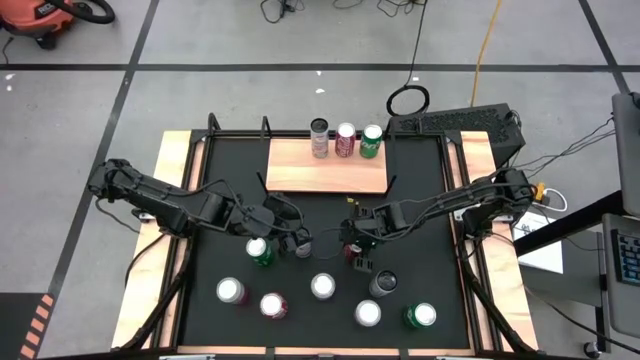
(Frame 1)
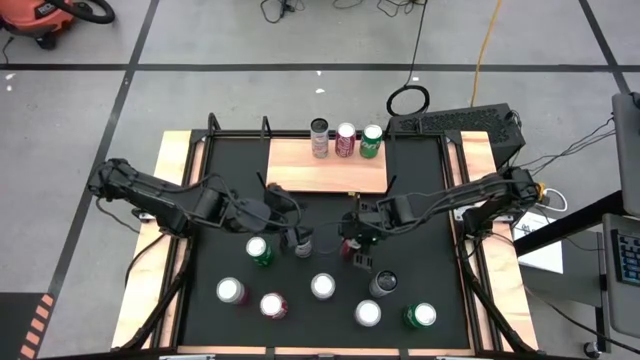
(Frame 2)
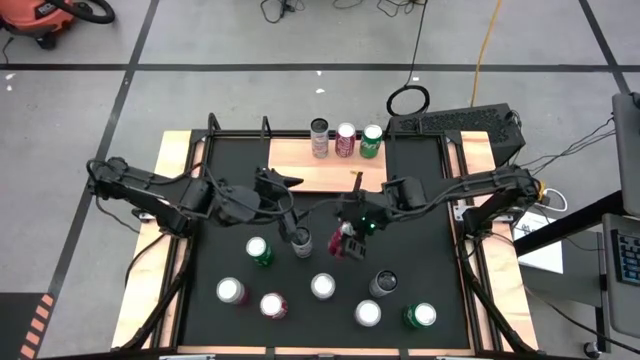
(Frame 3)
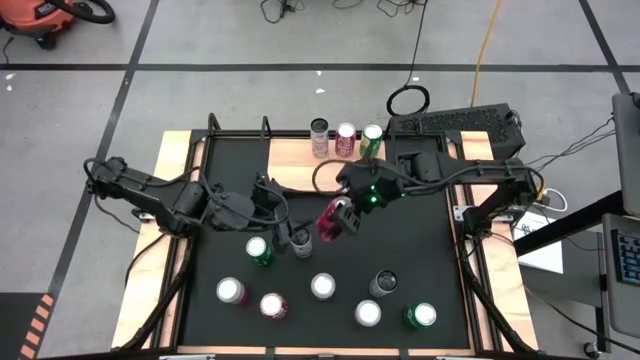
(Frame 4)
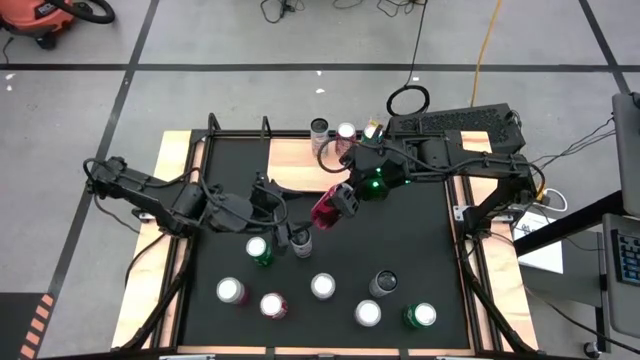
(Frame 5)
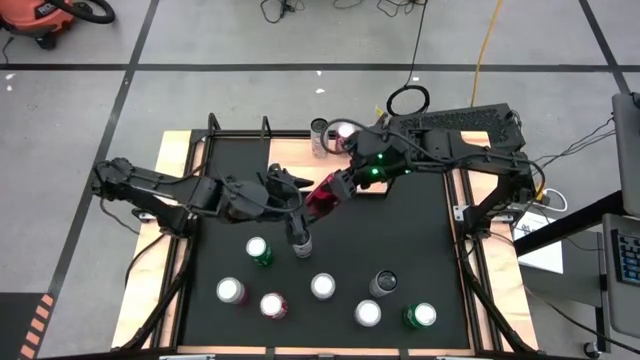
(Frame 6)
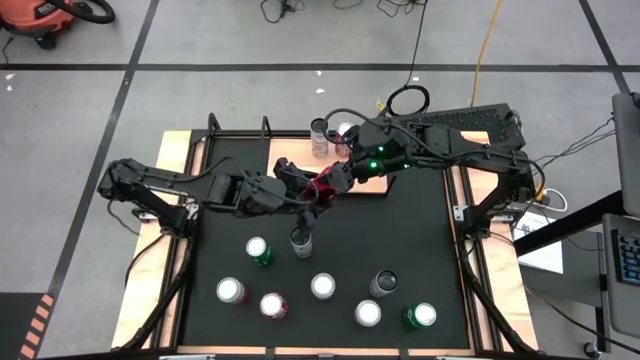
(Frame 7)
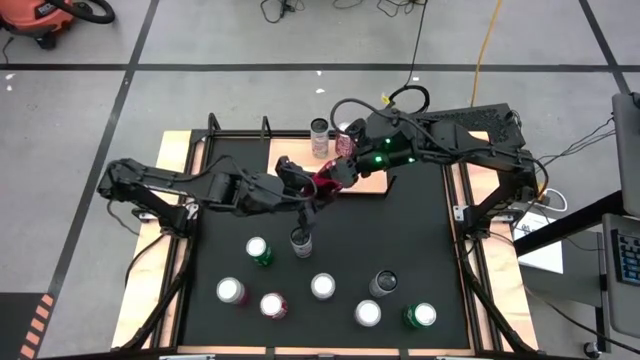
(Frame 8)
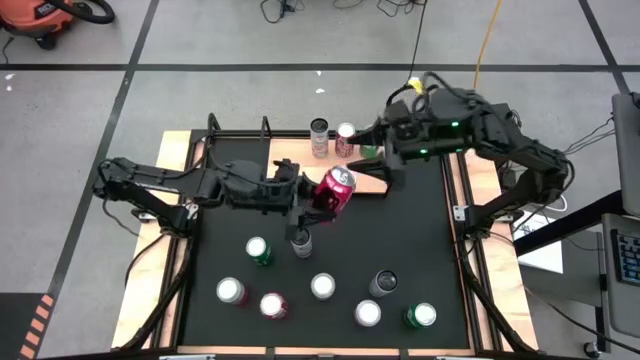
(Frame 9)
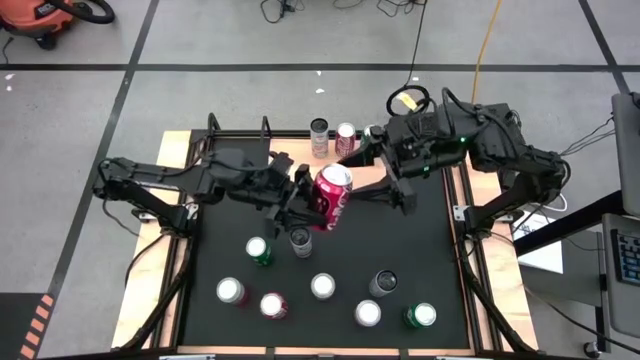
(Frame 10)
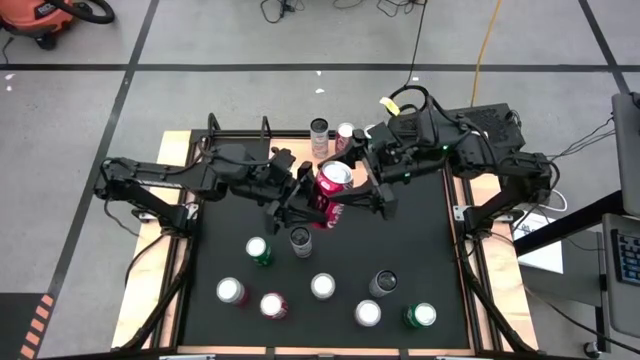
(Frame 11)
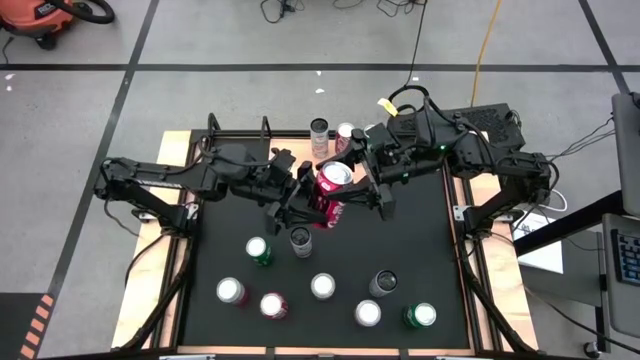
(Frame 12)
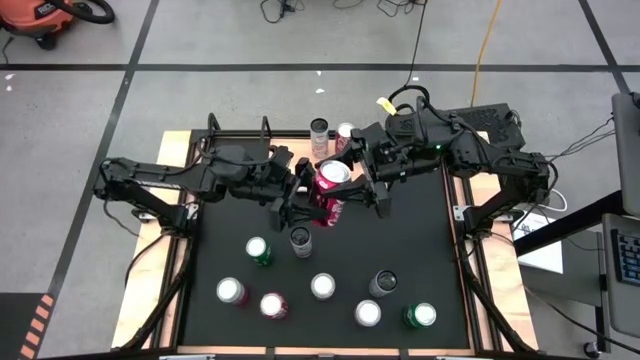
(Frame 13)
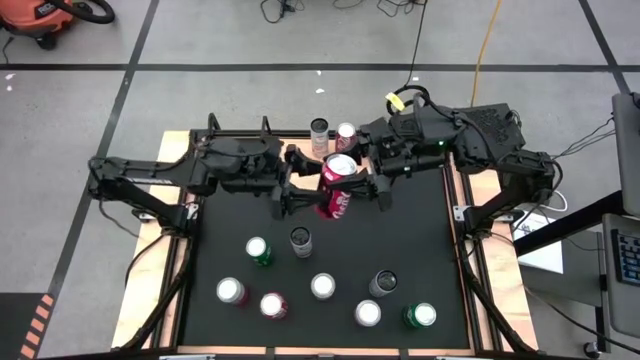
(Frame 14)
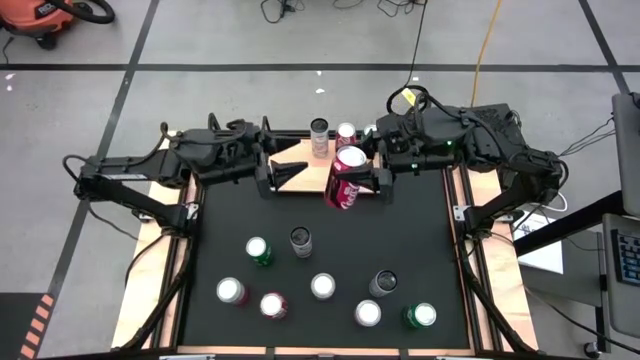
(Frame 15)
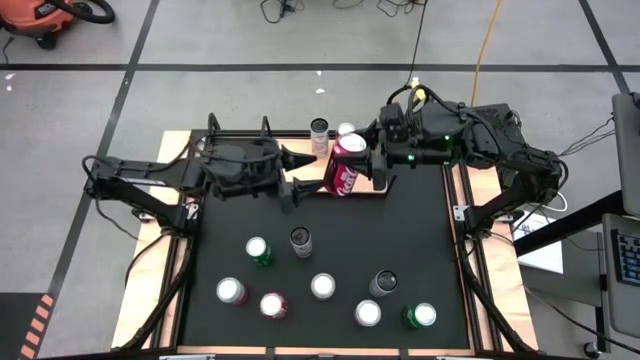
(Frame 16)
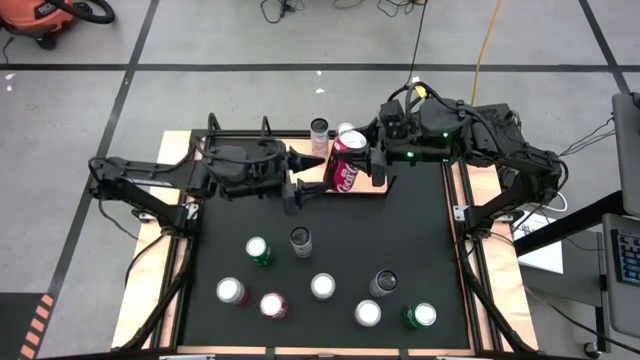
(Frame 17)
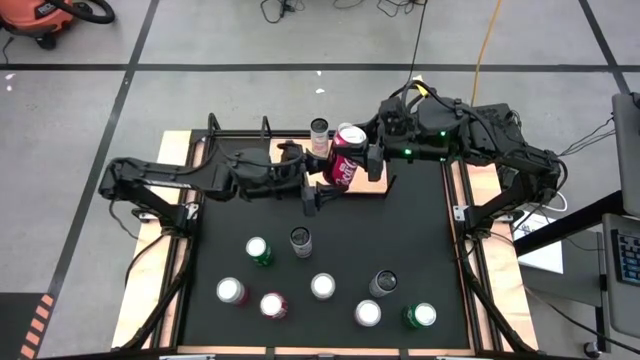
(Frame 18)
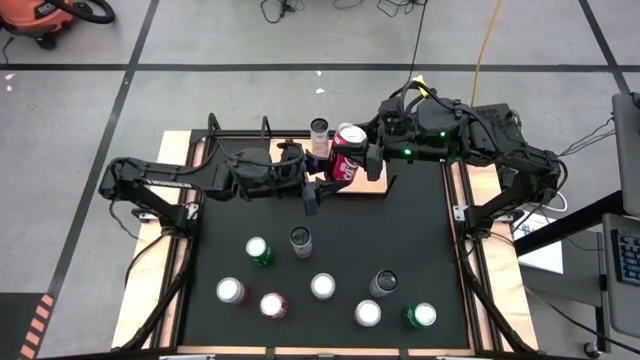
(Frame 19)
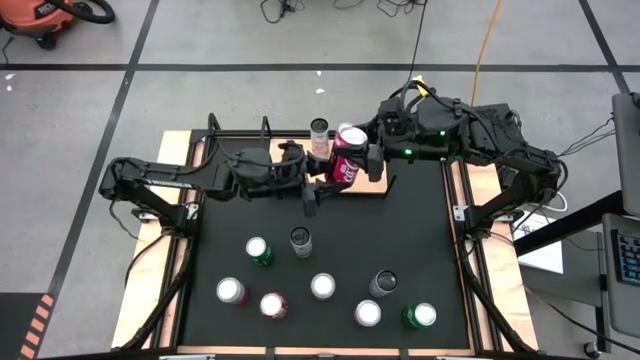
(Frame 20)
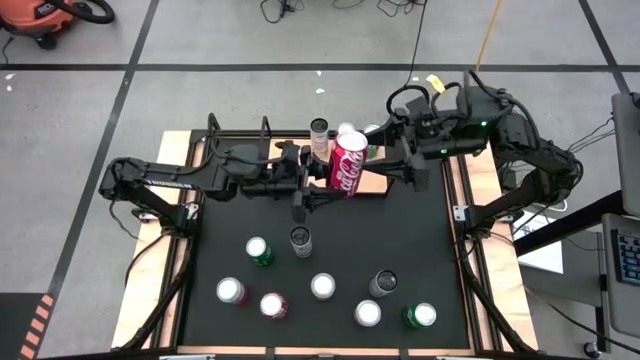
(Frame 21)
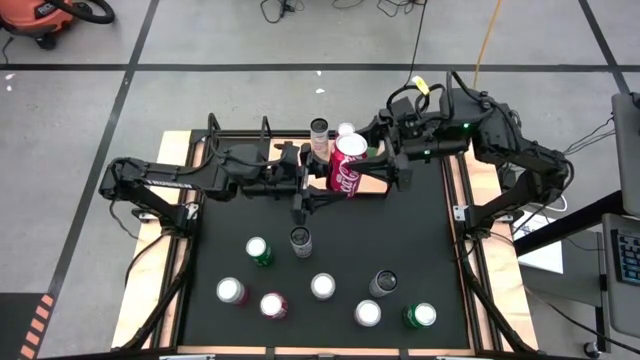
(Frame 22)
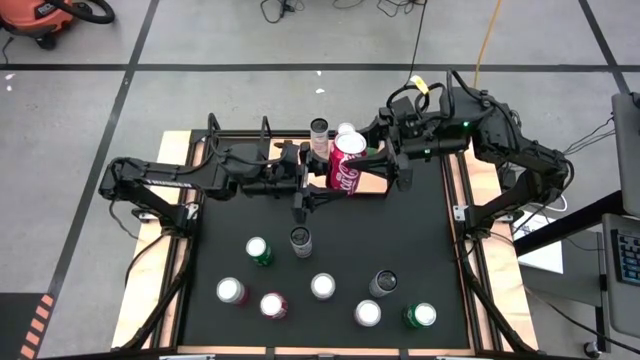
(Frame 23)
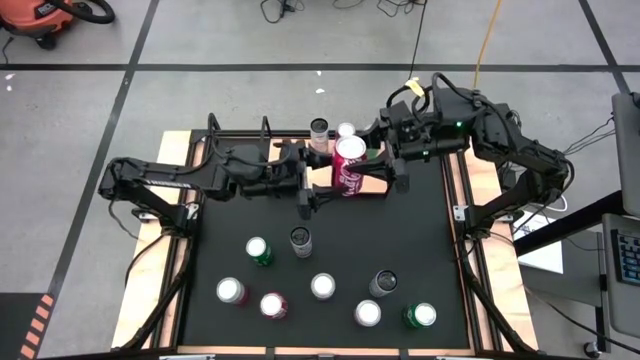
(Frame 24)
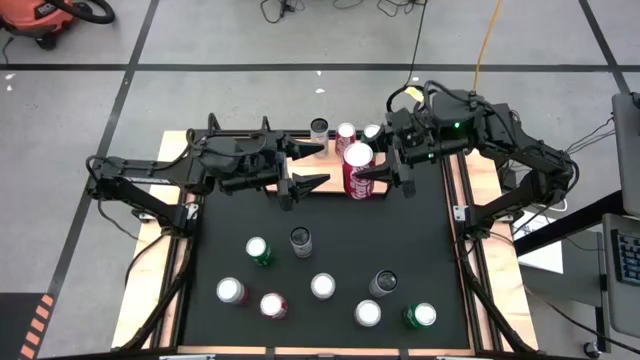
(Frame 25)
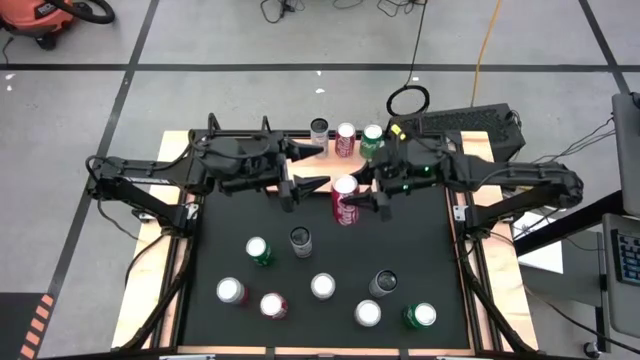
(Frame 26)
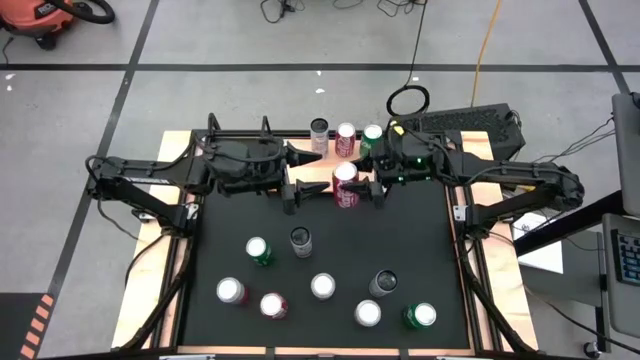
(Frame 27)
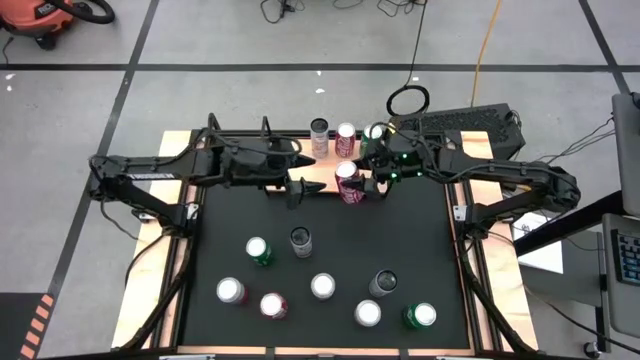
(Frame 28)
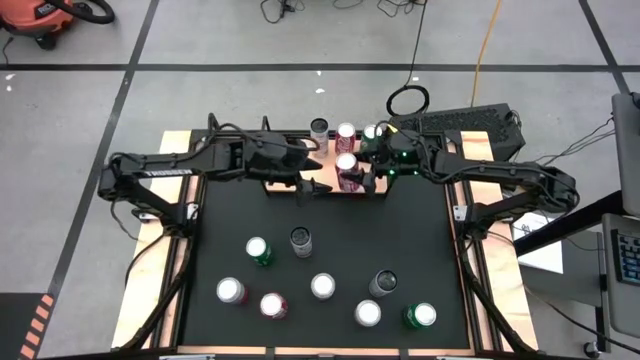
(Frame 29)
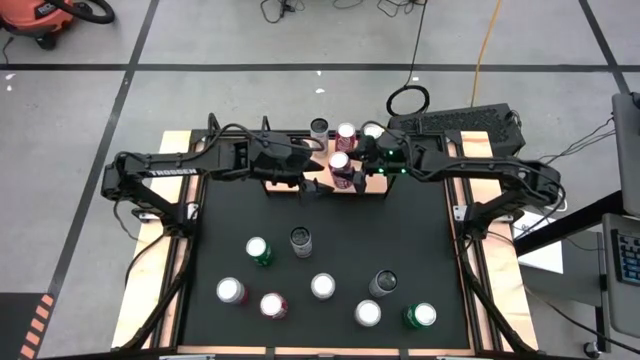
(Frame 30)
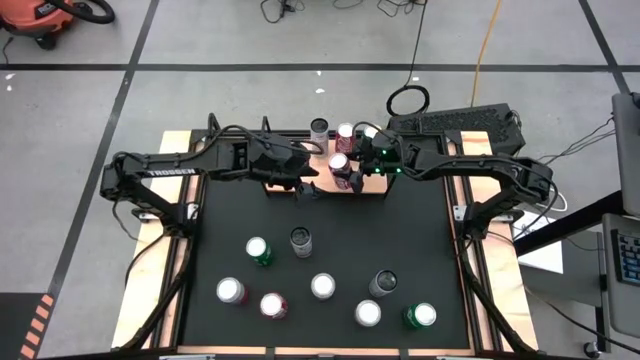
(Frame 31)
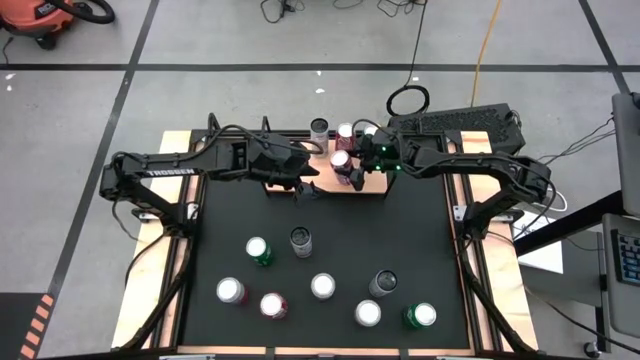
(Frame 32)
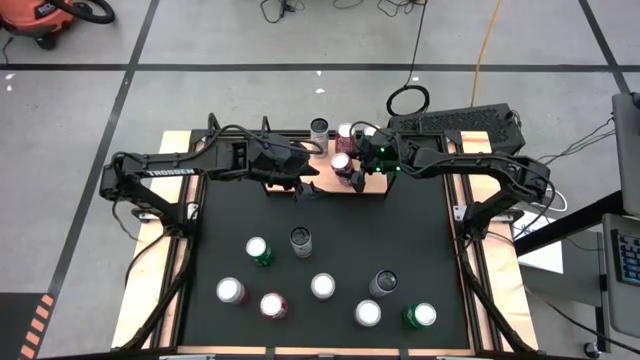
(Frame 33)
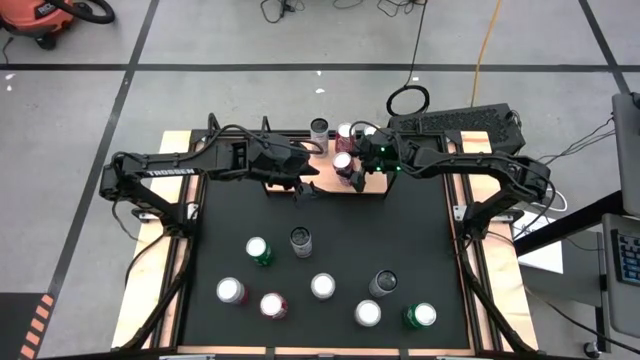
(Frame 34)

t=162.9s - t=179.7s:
Task: Place canned beverage on shelf
Put the top red soda can on the shelf

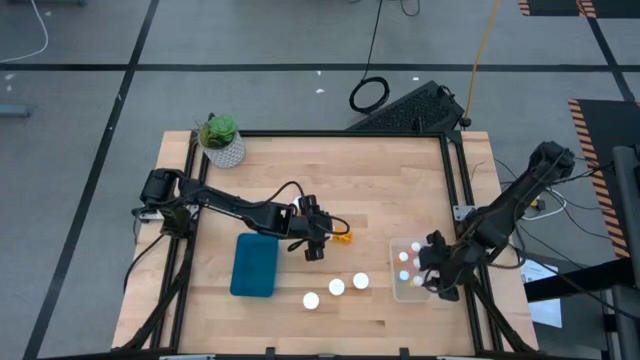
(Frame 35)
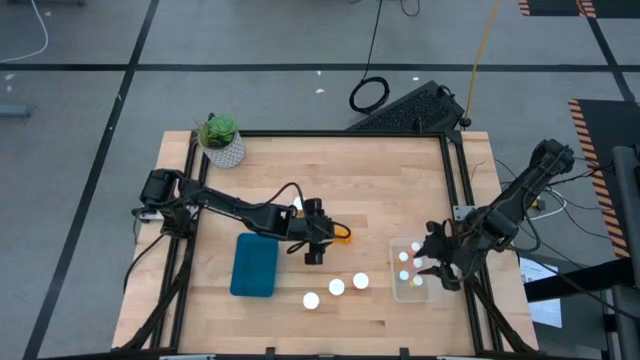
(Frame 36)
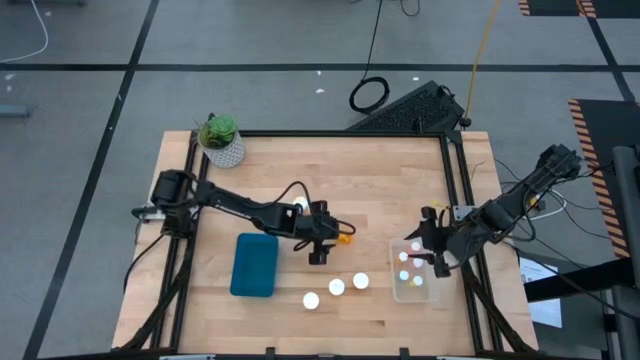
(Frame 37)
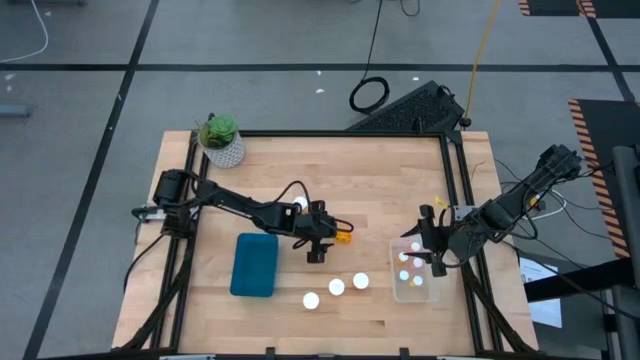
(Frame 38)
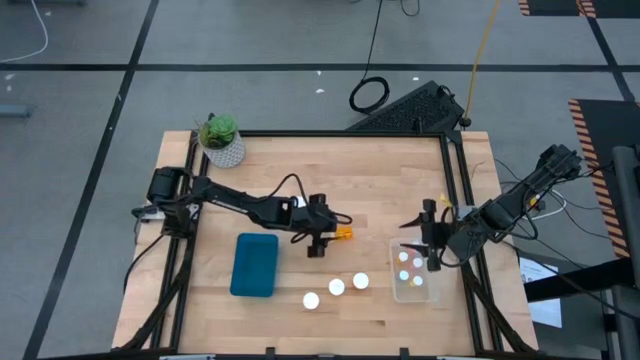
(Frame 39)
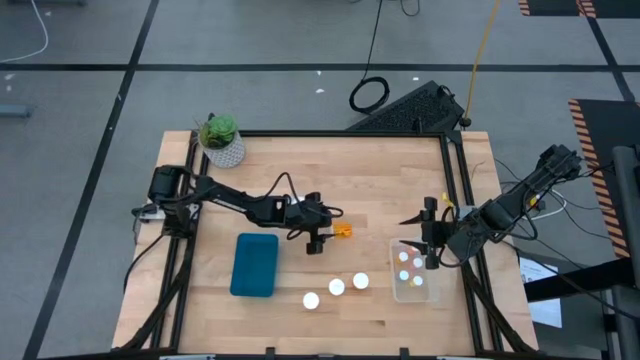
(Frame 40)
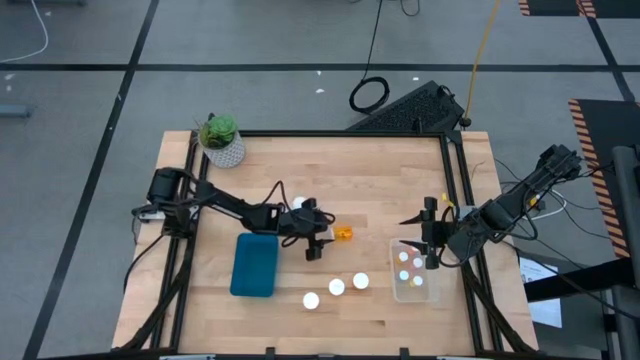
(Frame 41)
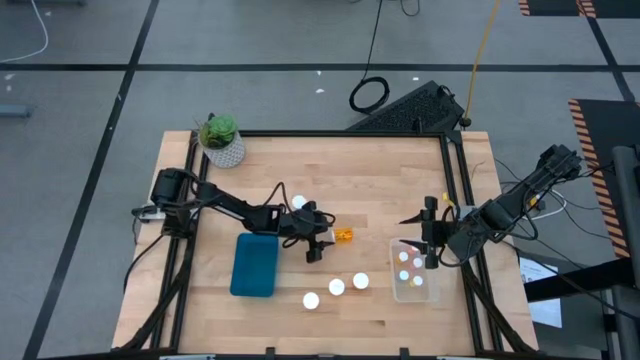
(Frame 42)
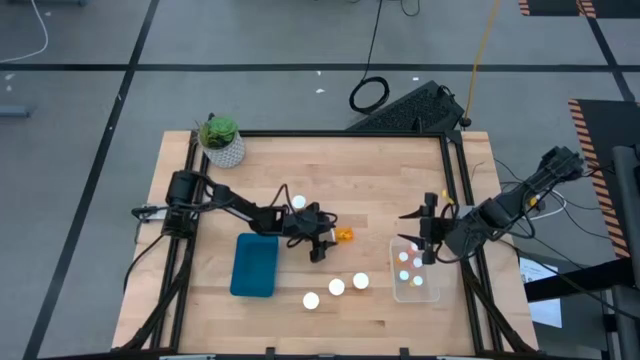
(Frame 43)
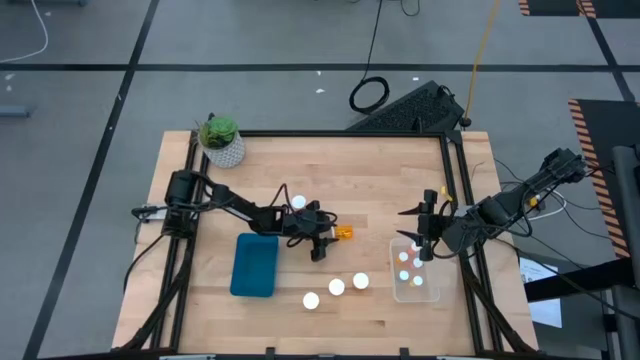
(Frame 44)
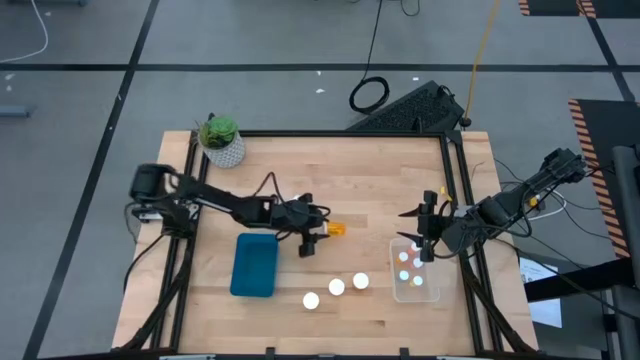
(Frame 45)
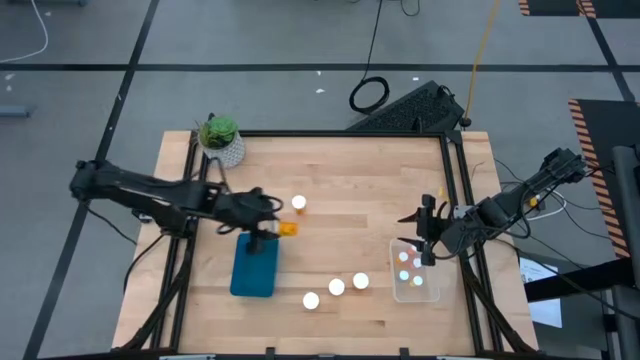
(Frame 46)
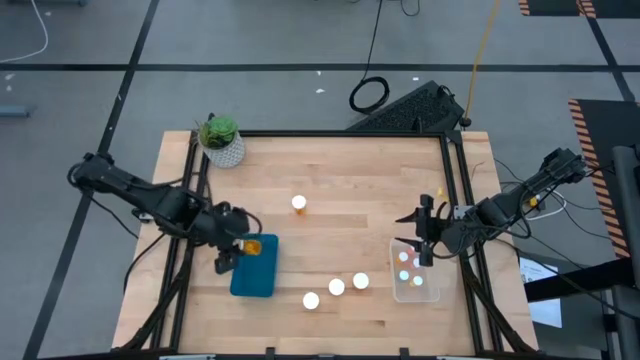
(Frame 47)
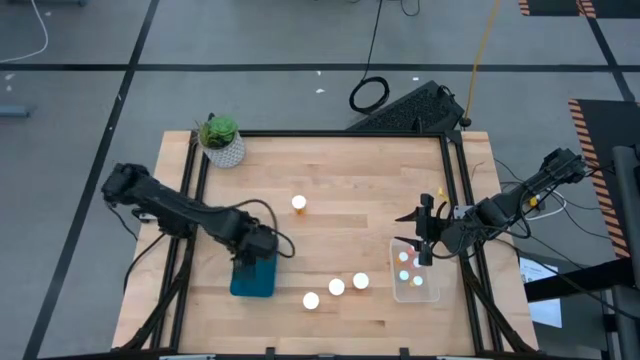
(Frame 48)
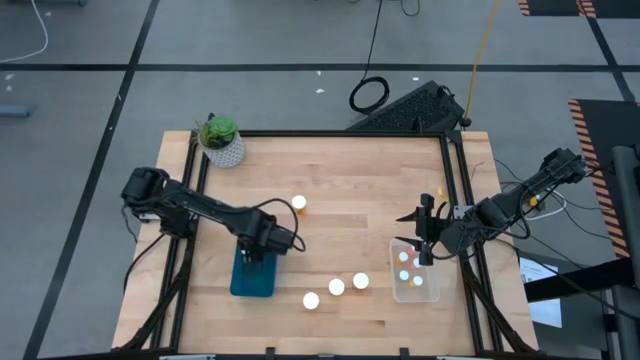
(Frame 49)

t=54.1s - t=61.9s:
Task: Pick and place medicine bottles into bin by pill shape (circle, oval)
Put the orange bottled capsule into the blue bin
